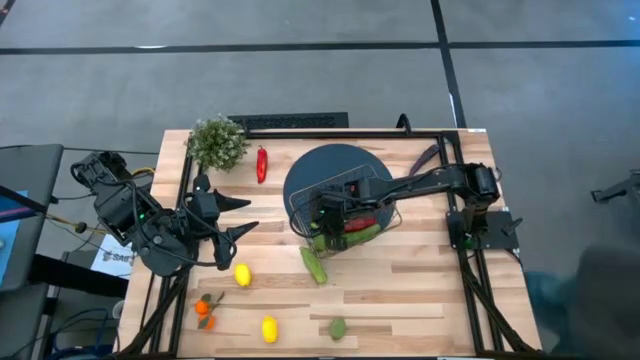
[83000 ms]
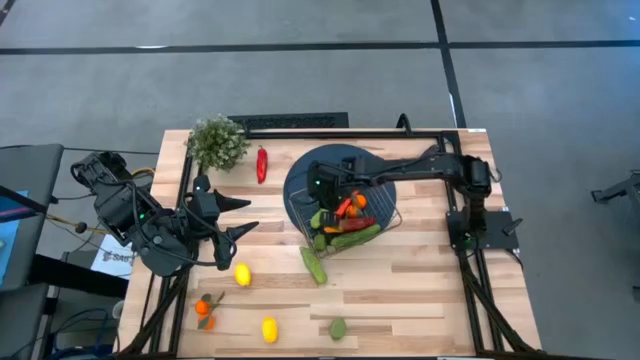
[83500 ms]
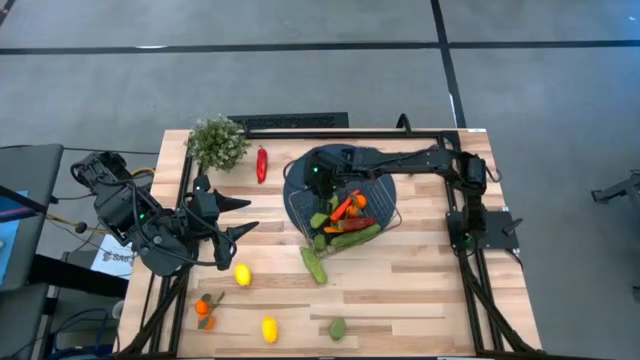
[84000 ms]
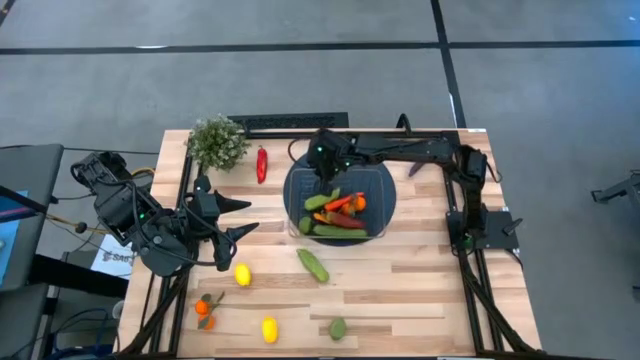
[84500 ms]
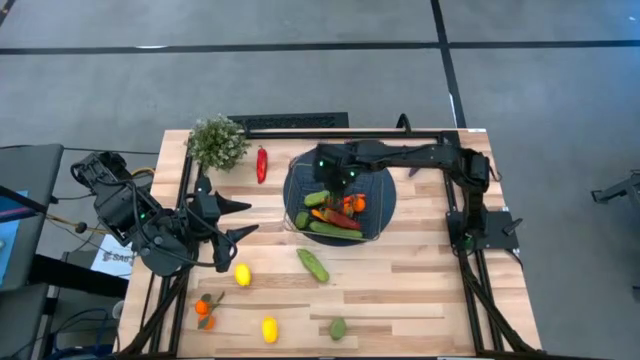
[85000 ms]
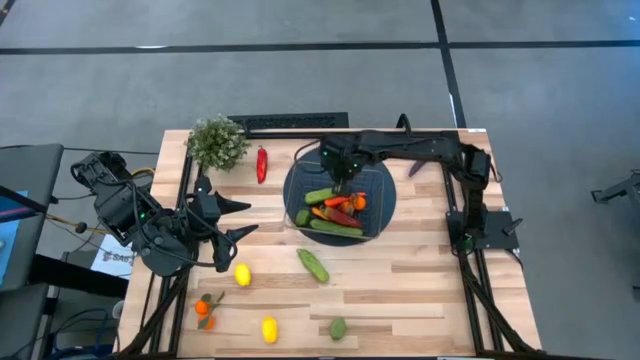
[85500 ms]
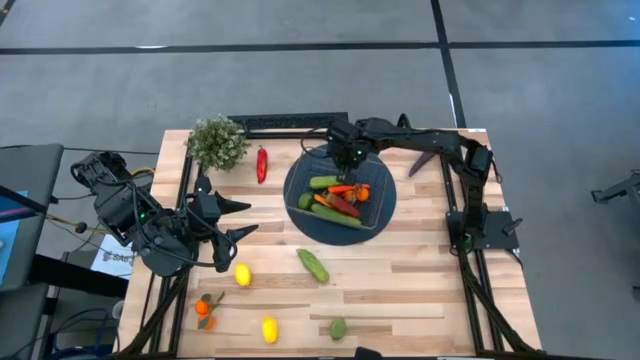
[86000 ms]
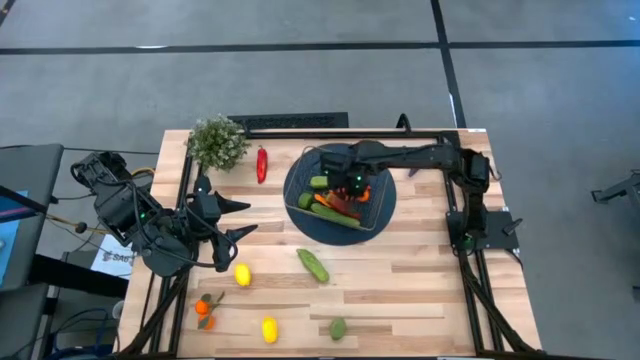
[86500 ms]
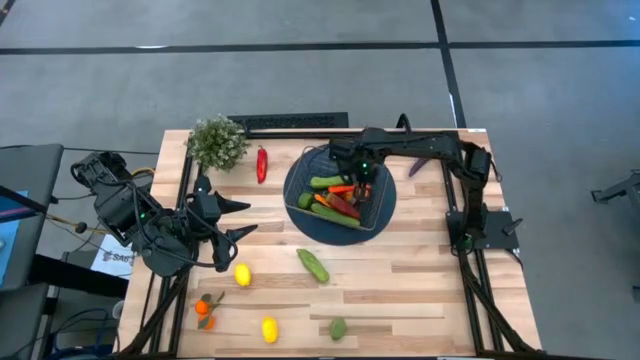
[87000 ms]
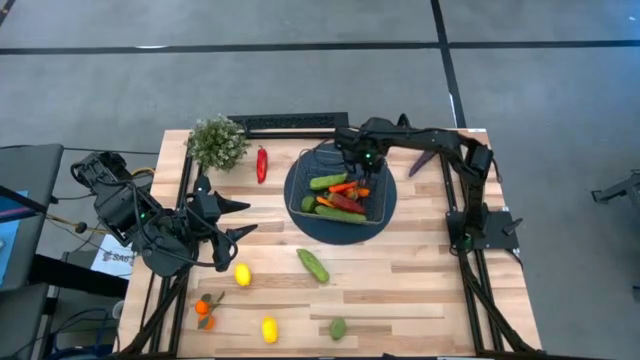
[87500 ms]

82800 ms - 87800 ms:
Task: Build produce basket
Adjust the wire basket

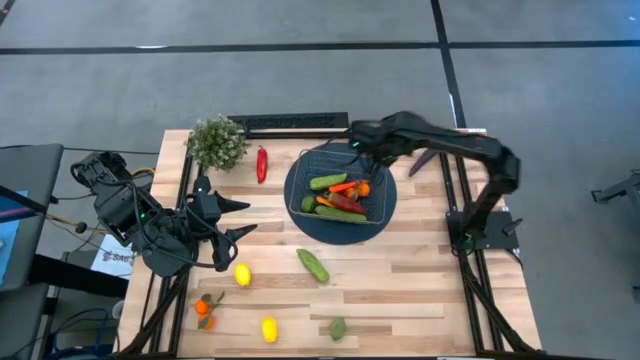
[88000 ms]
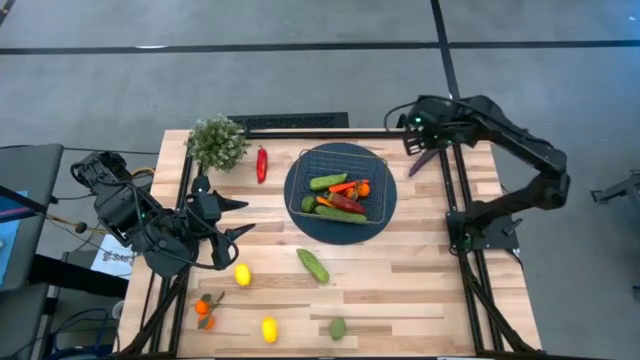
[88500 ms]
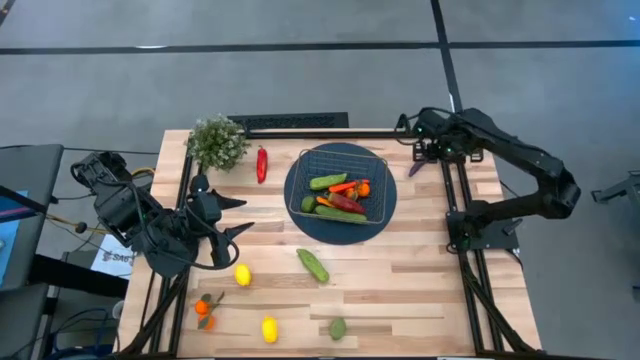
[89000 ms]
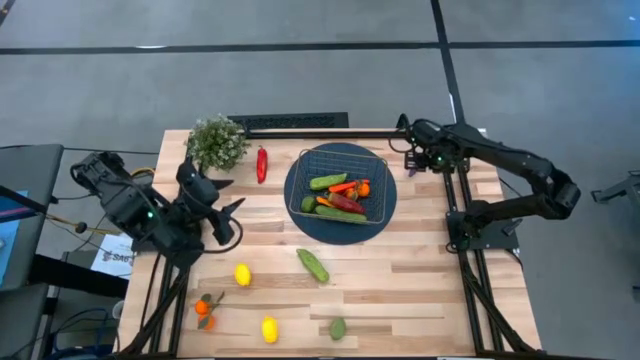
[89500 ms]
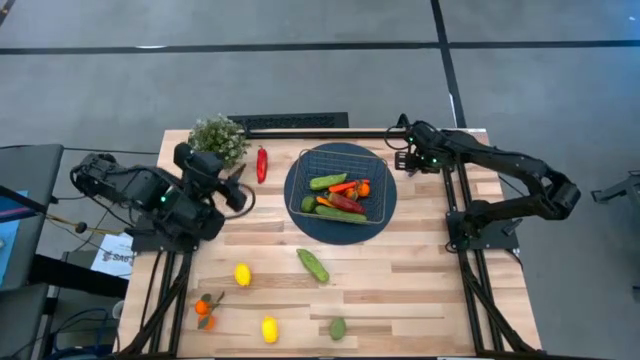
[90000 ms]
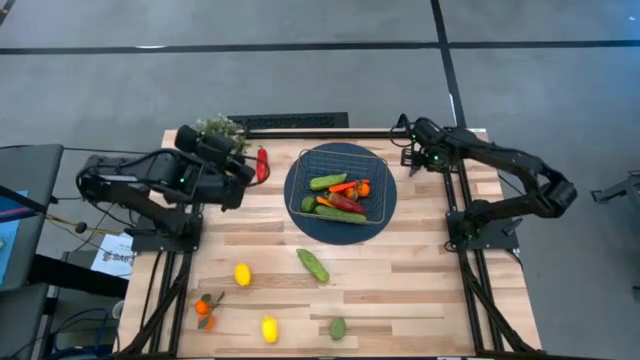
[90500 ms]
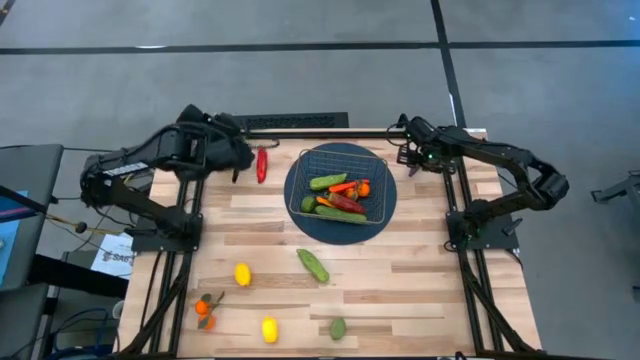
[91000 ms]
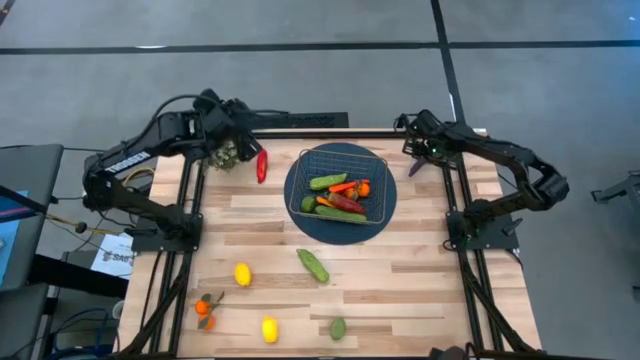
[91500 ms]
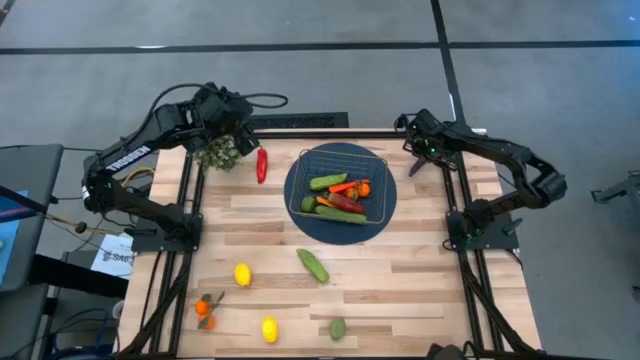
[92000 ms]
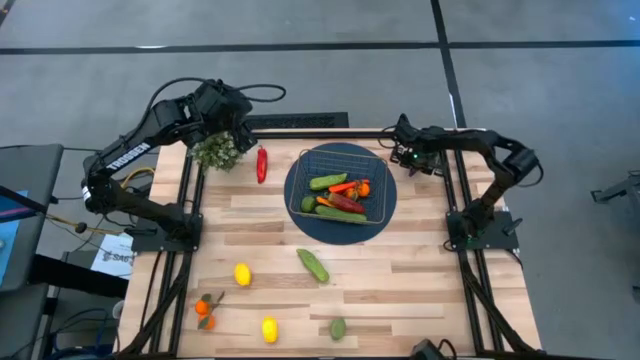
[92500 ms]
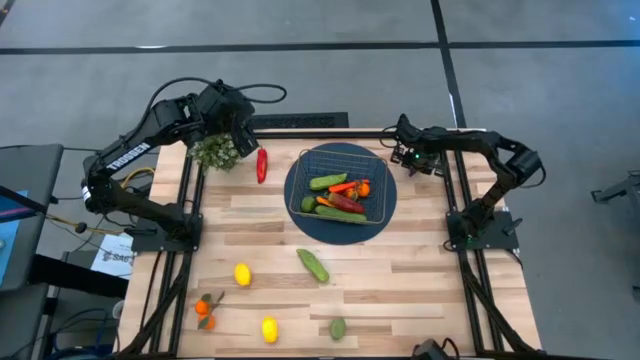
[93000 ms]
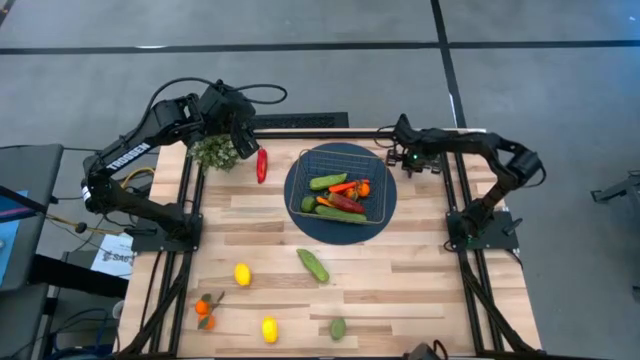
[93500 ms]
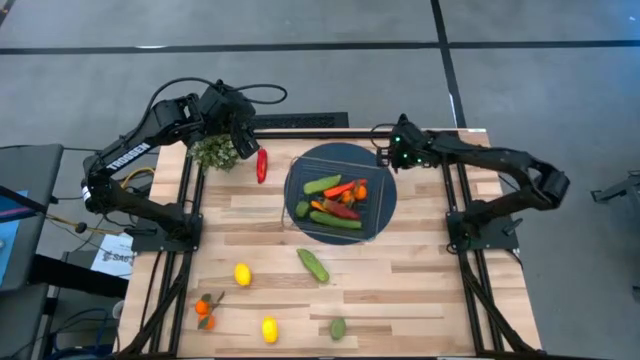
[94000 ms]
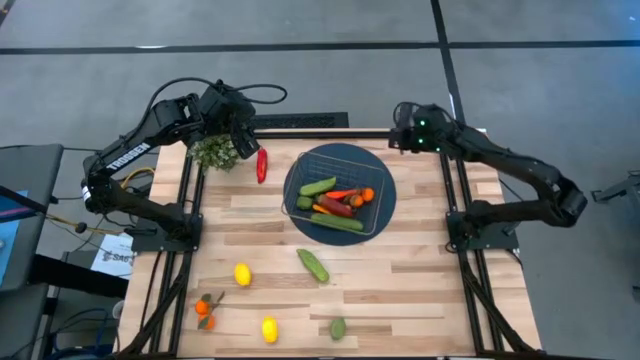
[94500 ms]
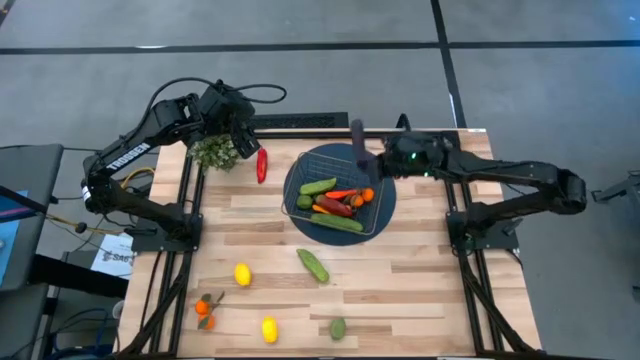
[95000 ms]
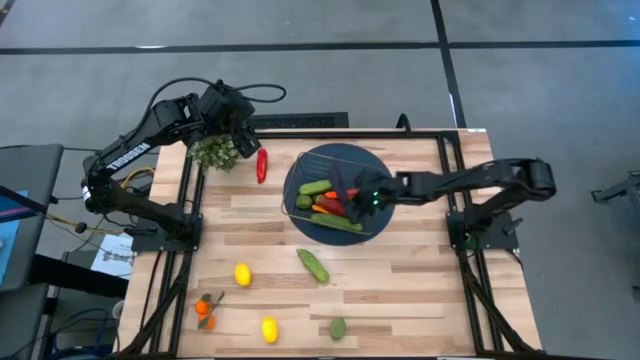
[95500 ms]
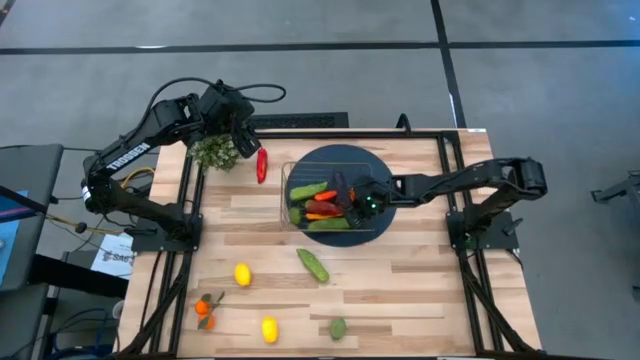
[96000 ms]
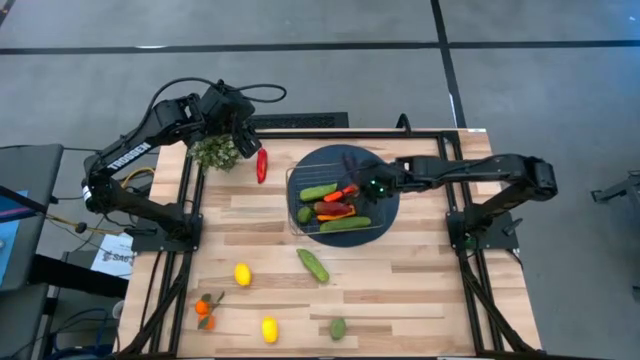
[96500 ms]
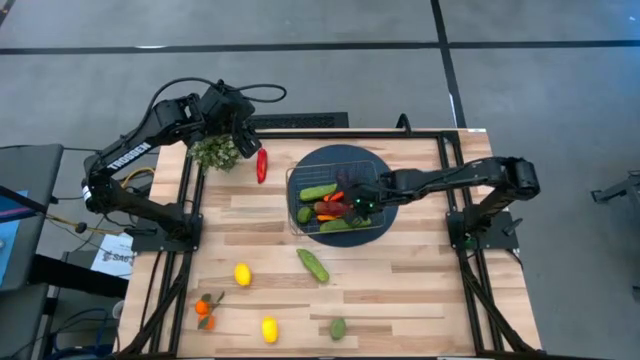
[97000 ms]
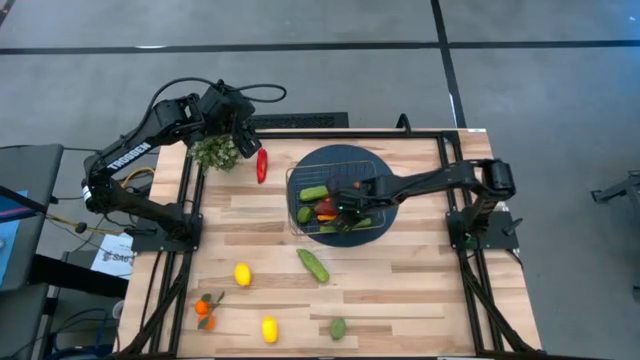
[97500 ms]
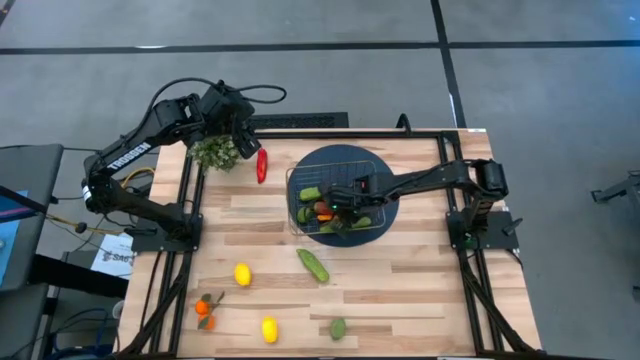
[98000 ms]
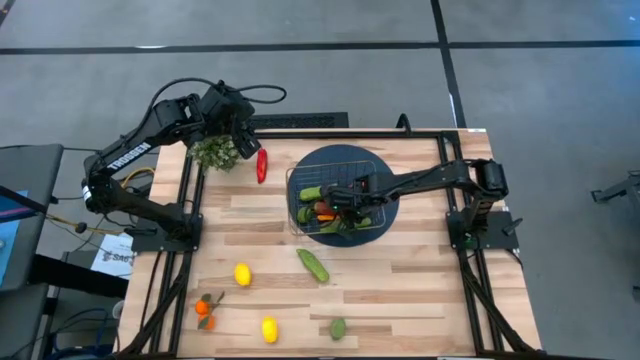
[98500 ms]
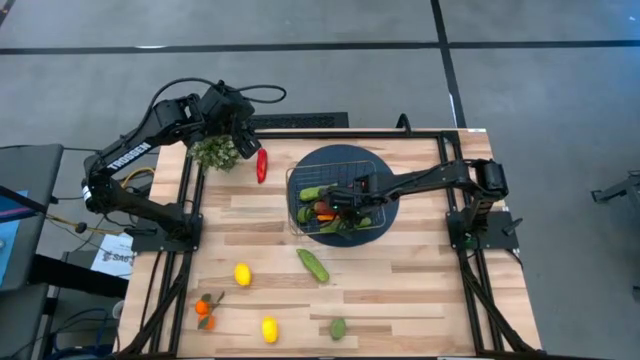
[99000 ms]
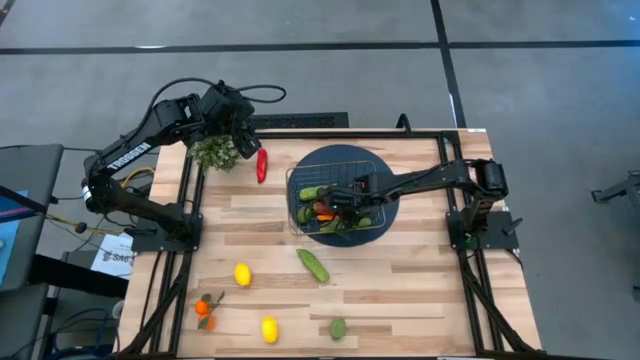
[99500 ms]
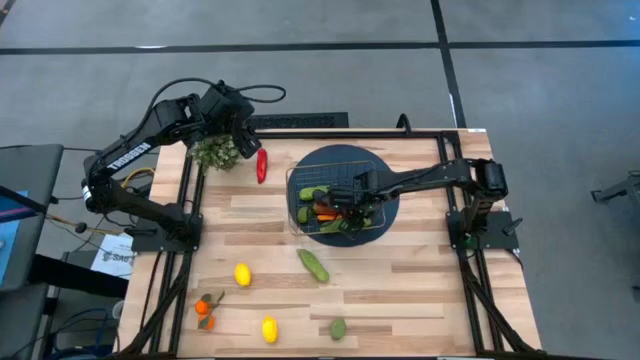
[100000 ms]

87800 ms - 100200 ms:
Put the eggplant into the wire basket

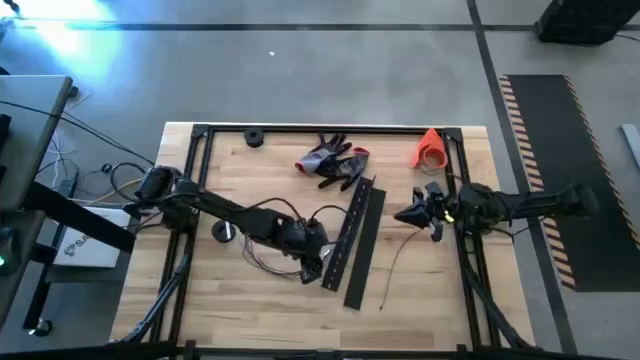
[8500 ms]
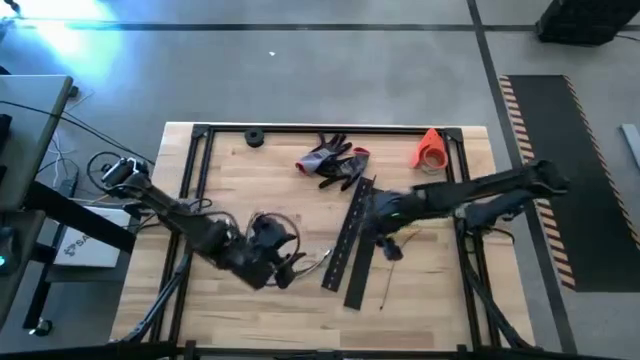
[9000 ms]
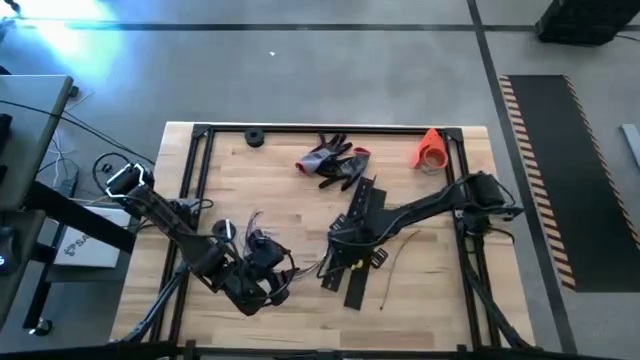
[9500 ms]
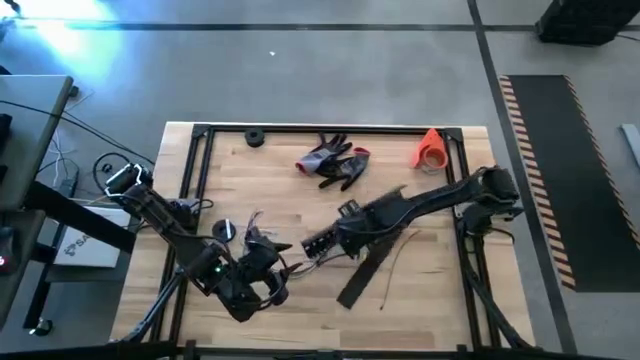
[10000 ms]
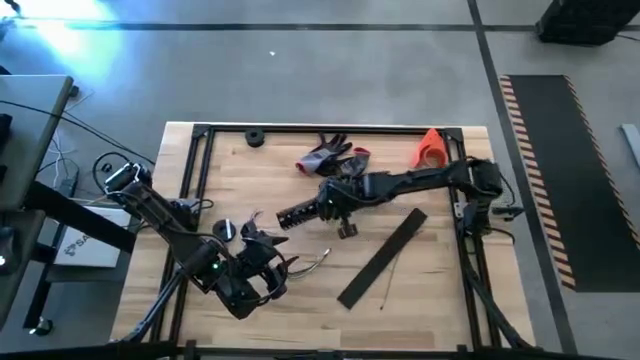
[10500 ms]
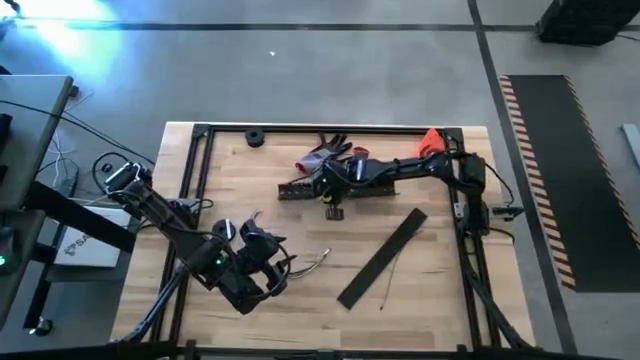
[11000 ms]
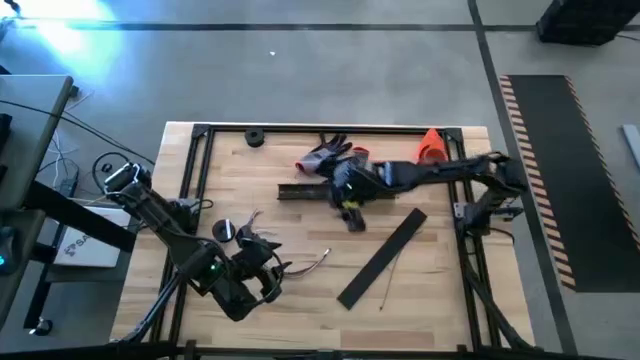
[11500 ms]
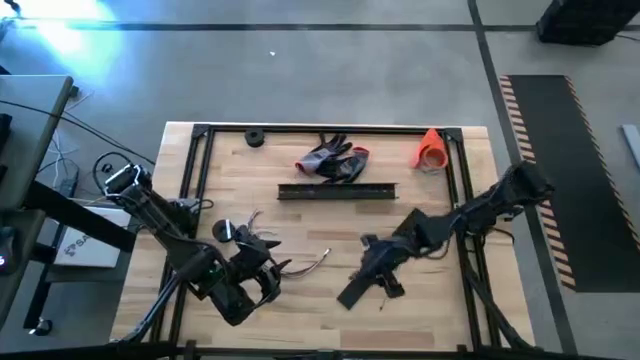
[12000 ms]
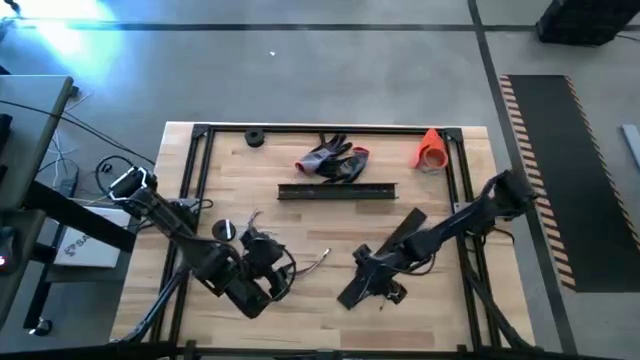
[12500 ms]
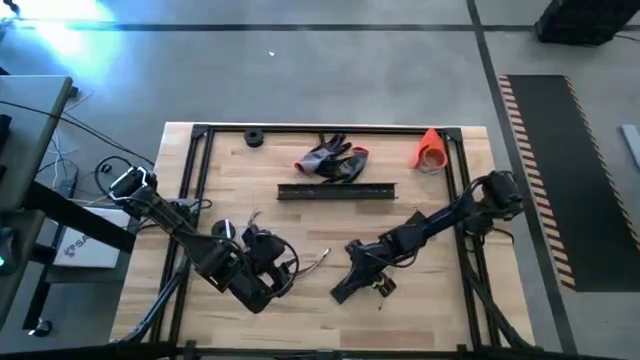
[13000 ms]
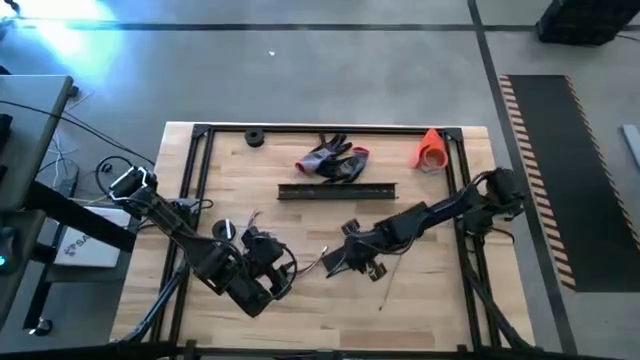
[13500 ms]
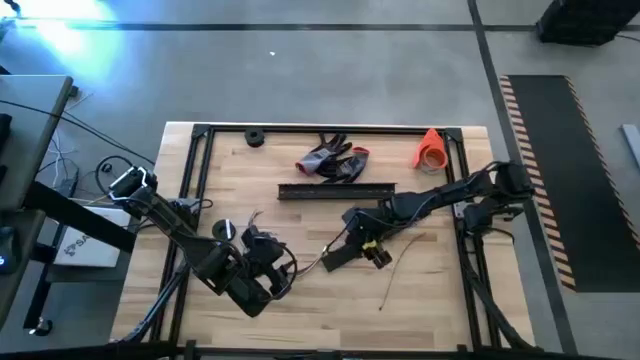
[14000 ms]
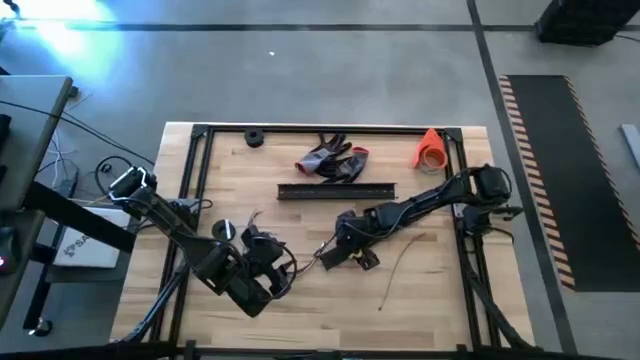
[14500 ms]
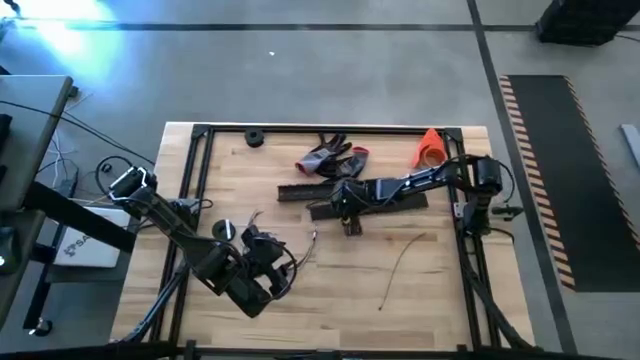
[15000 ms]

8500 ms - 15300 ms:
Task: Ziptie cables
Move the black cable duct to the top center of the table
